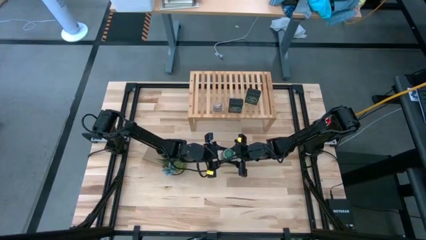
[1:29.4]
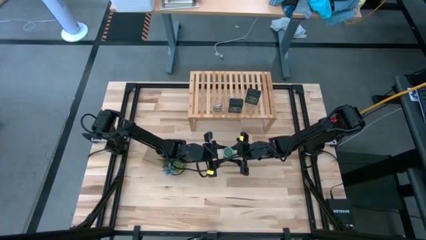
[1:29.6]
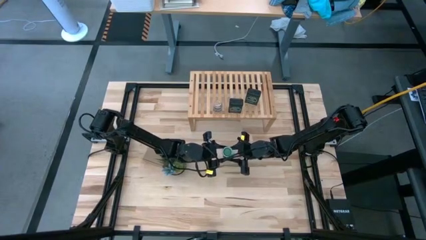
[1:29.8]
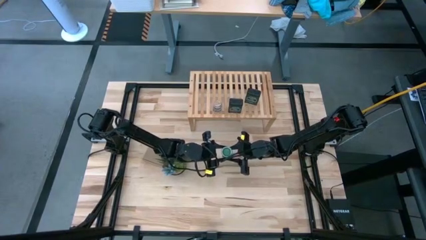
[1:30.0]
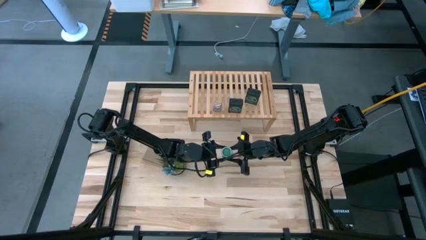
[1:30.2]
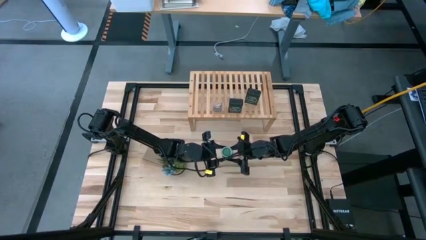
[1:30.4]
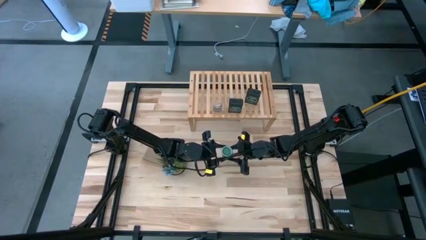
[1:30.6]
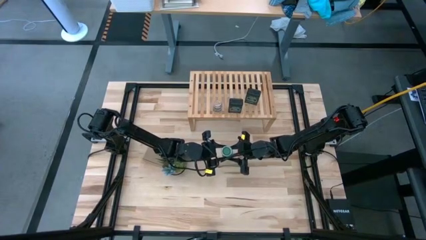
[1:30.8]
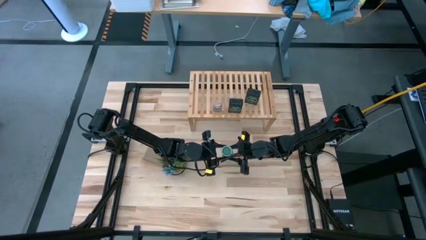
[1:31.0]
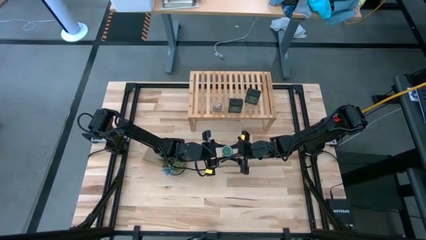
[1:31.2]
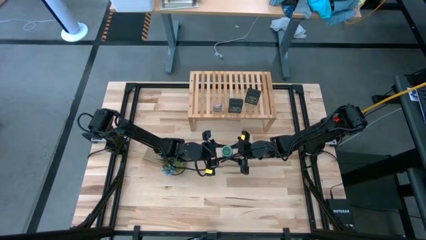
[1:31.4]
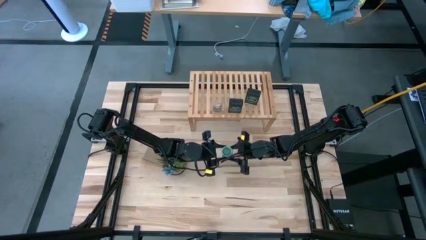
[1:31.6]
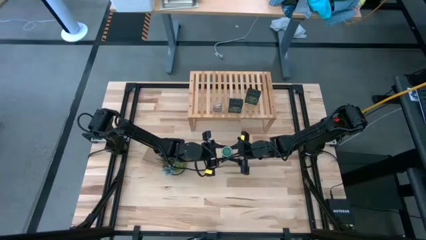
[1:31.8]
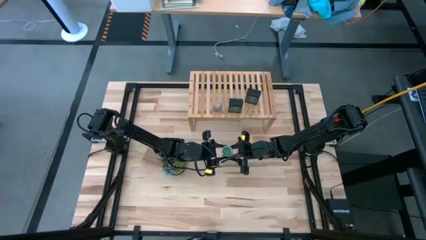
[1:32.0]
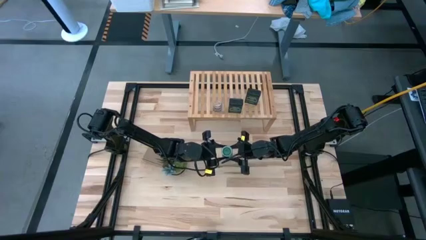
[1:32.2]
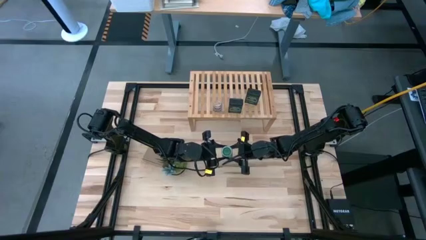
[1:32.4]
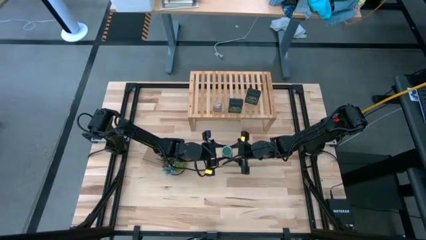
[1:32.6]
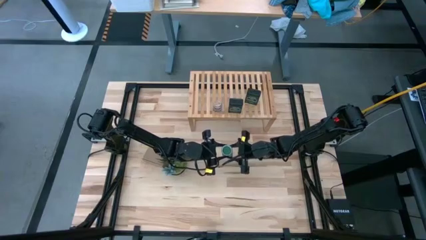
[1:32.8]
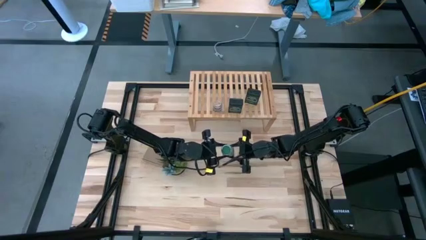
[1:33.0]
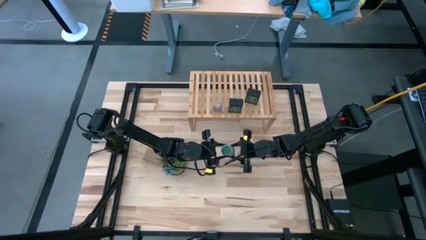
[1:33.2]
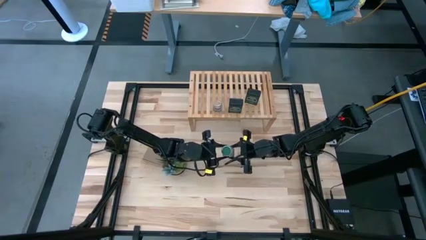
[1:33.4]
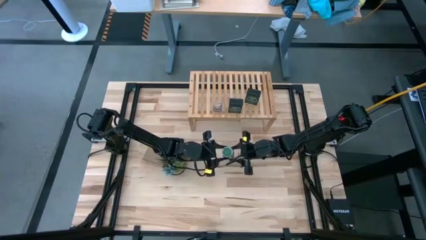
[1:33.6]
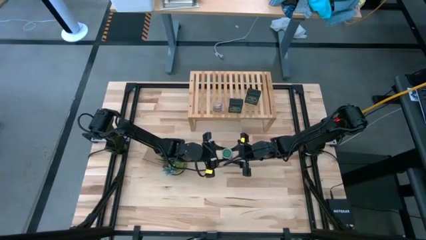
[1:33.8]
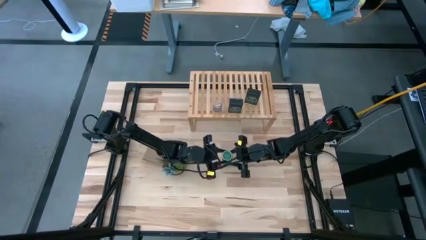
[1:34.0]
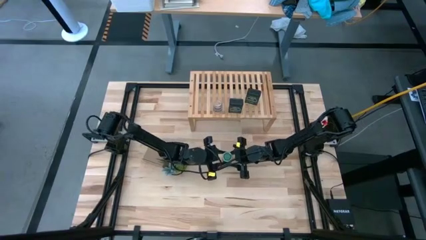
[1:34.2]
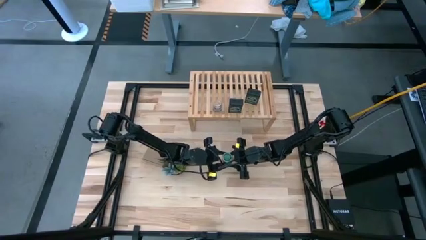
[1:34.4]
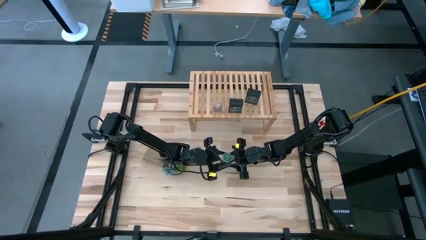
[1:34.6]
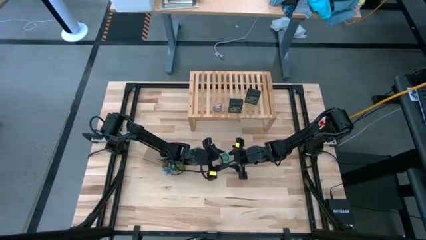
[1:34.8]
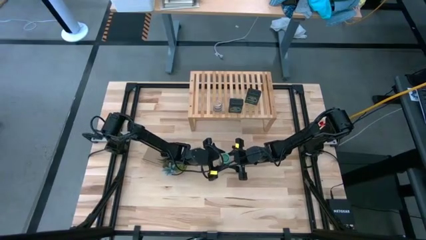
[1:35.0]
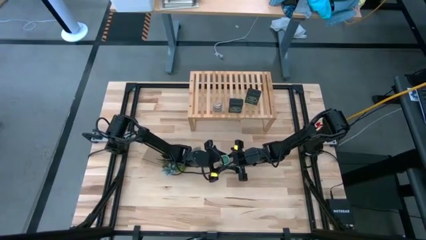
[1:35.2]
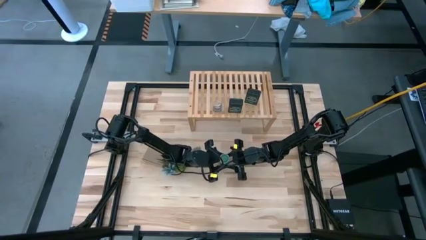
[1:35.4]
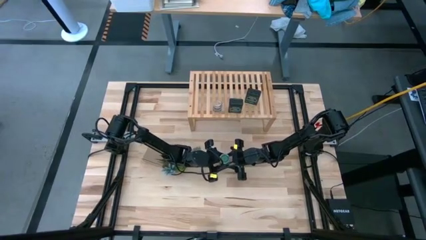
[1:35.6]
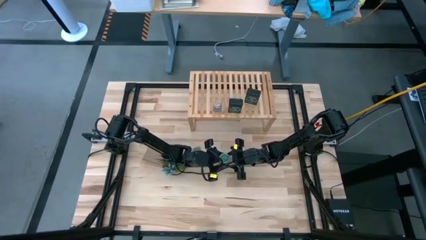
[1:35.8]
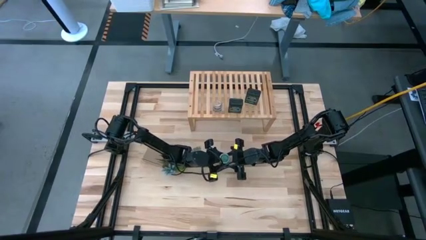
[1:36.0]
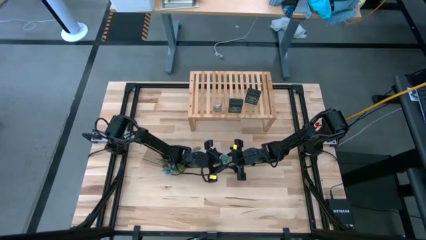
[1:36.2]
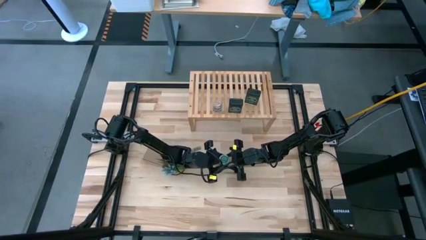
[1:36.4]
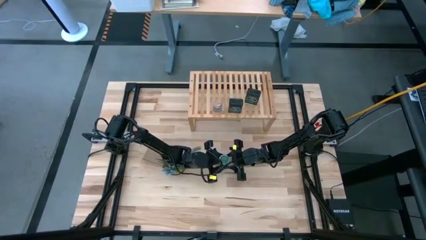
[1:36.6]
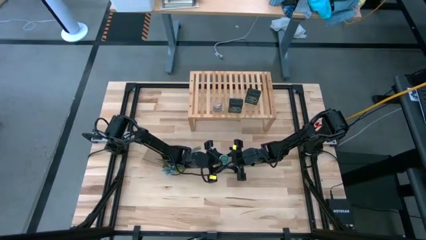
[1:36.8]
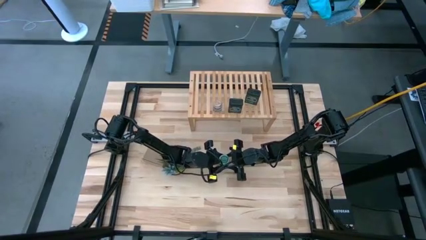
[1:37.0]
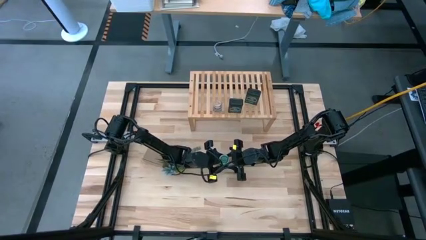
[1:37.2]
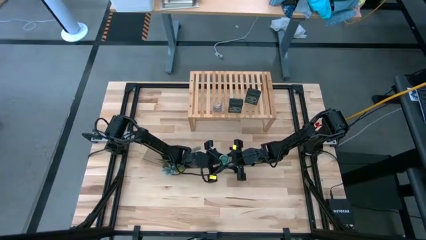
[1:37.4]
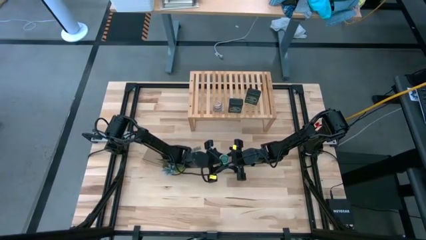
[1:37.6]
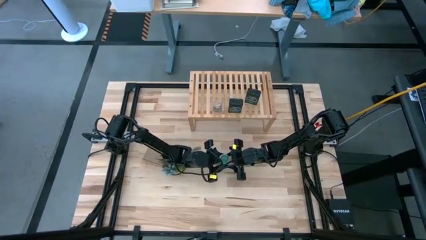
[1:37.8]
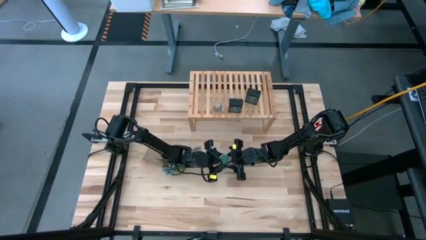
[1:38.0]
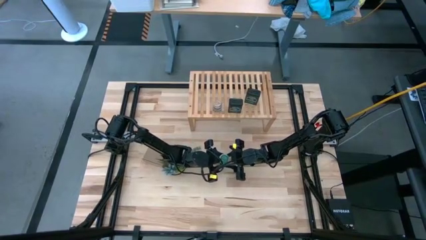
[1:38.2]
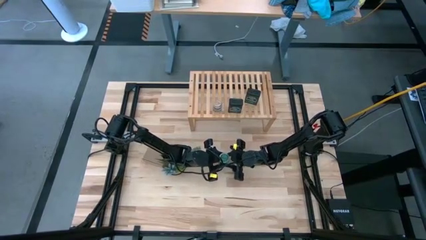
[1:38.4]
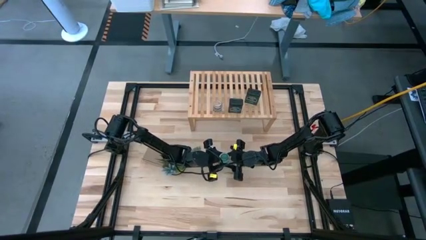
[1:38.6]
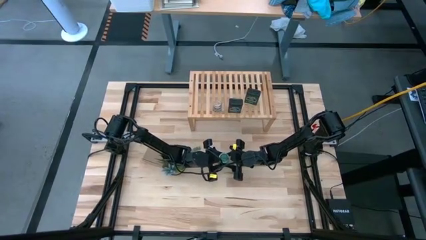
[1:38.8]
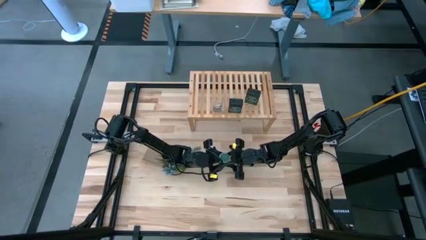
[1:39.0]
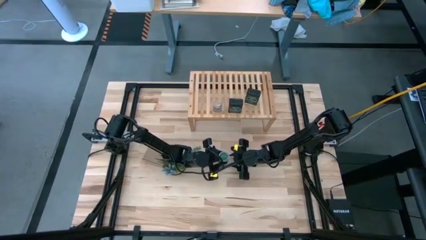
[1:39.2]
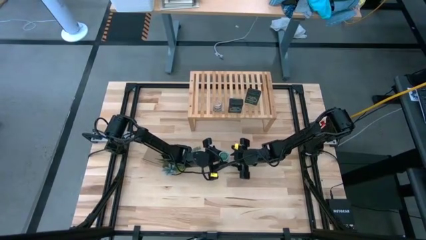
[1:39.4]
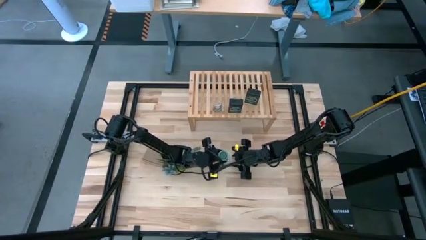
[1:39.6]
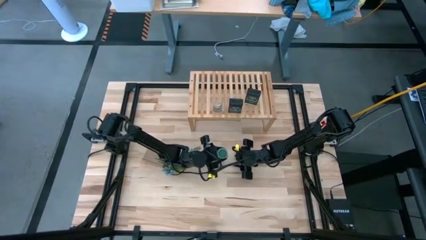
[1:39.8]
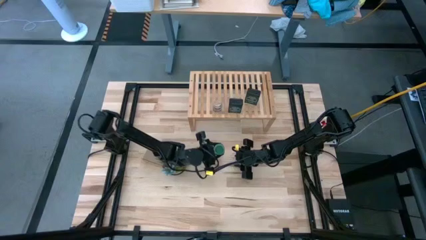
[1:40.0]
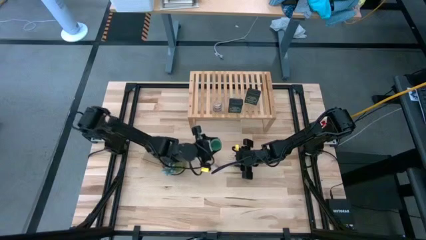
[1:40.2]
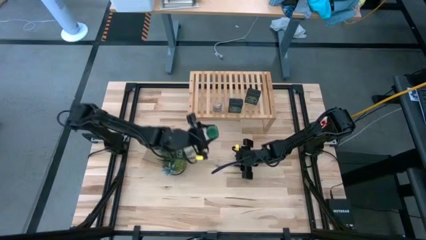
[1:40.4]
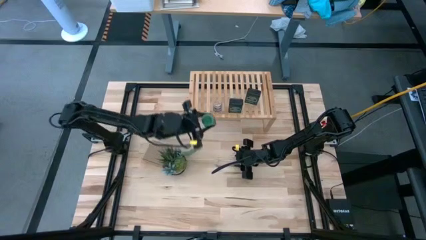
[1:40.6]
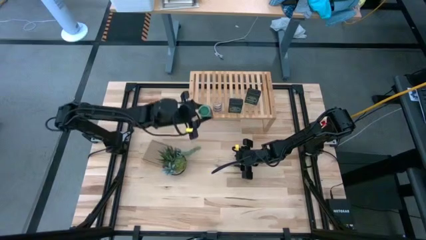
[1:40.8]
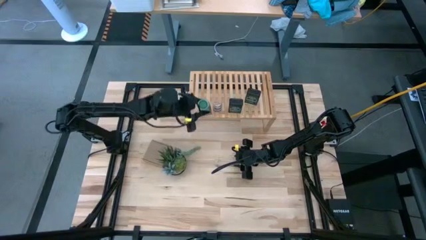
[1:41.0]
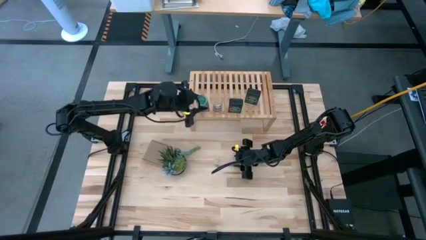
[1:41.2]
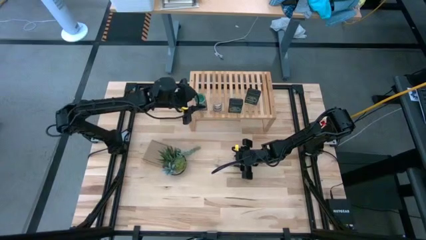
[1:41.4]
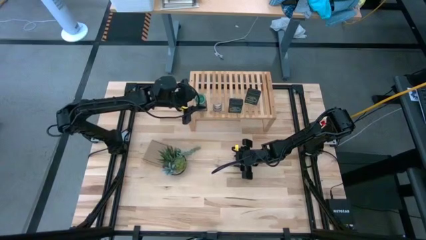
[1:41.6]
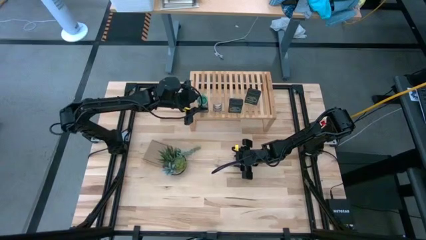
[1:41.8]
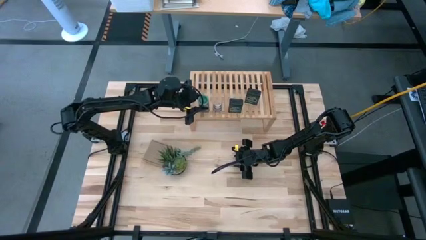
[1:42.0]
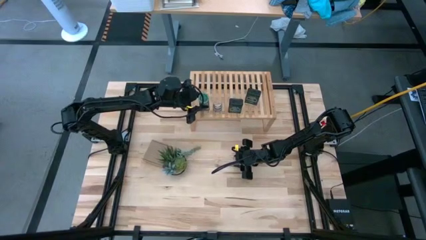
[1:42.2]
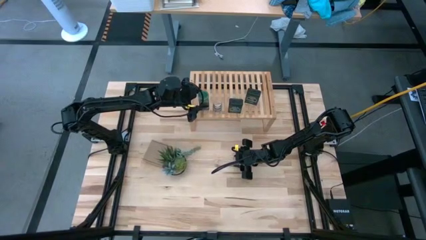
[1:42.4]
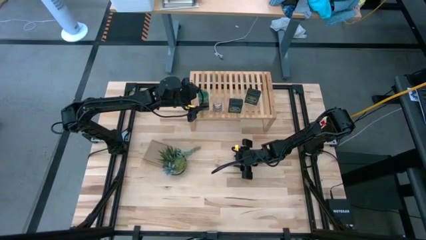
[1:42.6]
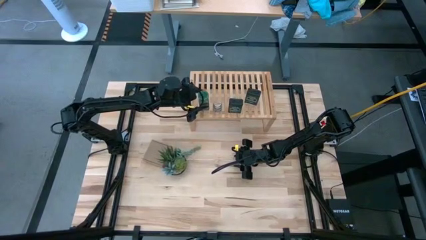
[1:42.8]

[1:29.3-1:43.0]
Task: Shelf spices
Put the green seasoning bottle on the shelf

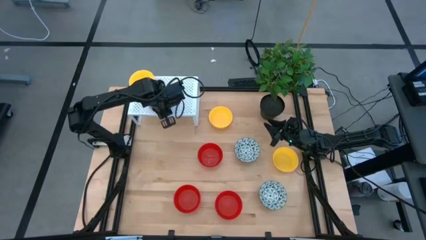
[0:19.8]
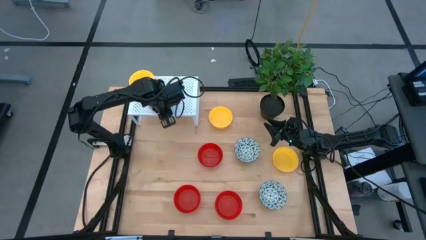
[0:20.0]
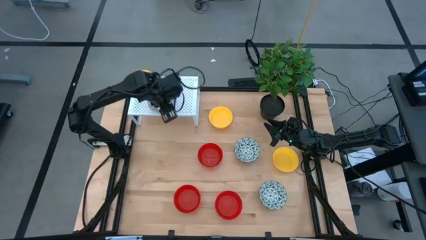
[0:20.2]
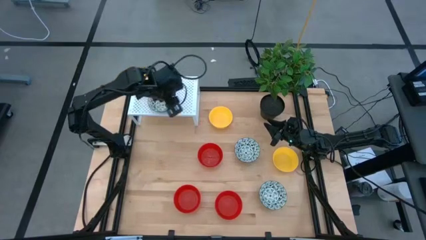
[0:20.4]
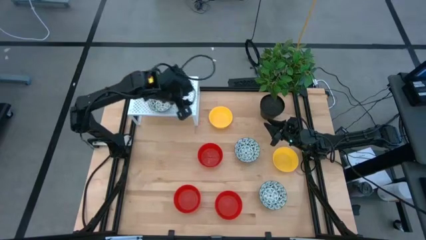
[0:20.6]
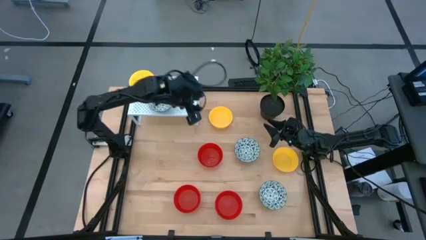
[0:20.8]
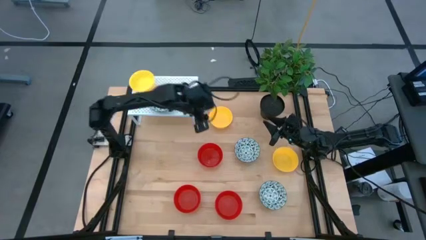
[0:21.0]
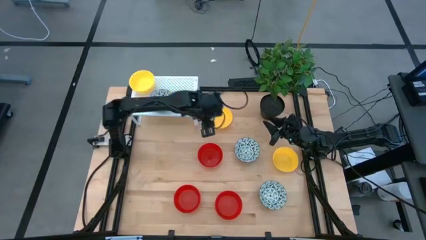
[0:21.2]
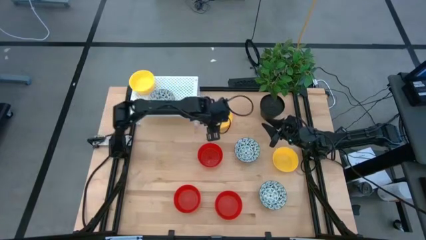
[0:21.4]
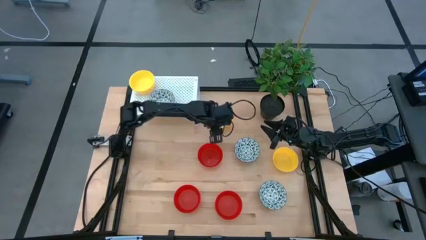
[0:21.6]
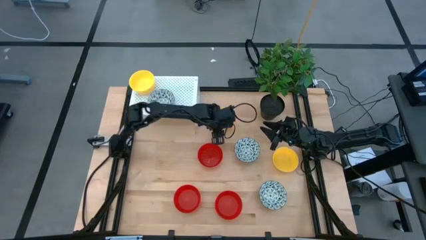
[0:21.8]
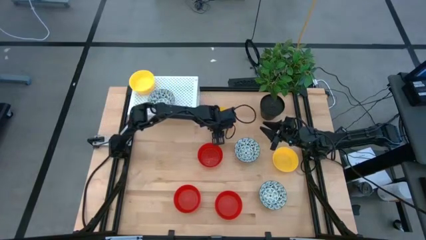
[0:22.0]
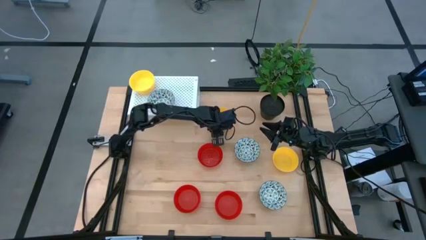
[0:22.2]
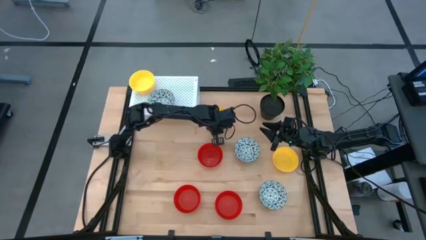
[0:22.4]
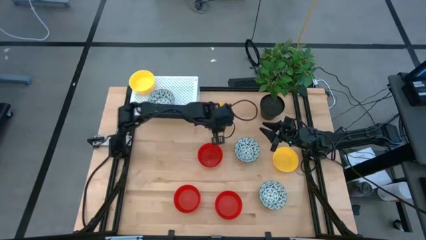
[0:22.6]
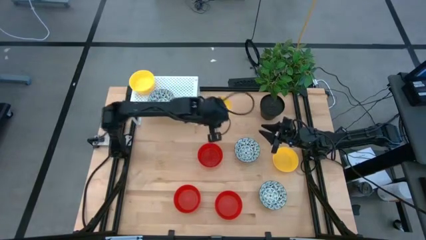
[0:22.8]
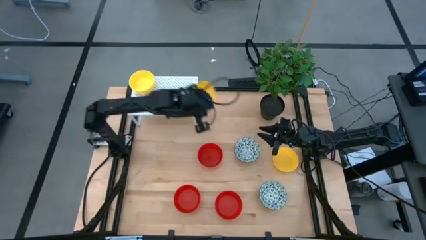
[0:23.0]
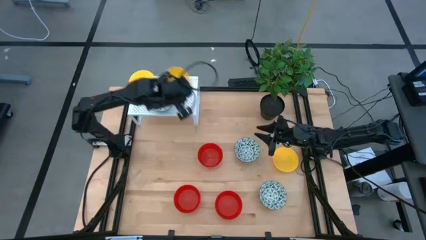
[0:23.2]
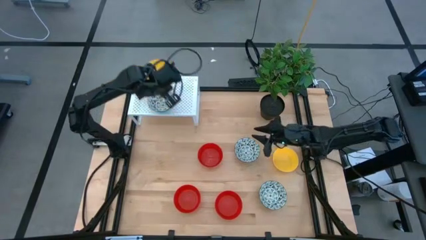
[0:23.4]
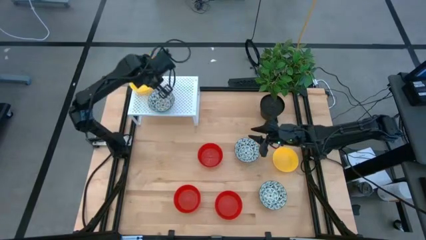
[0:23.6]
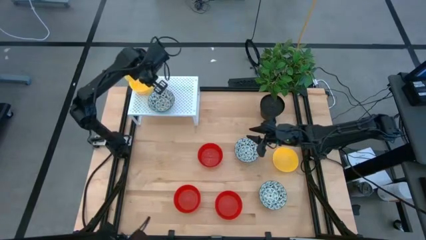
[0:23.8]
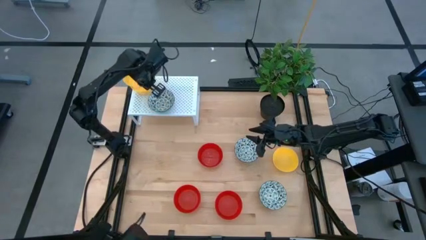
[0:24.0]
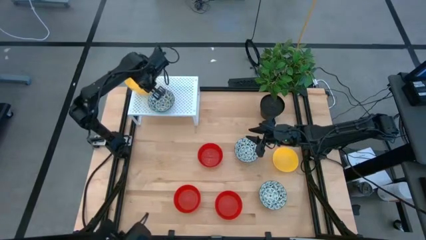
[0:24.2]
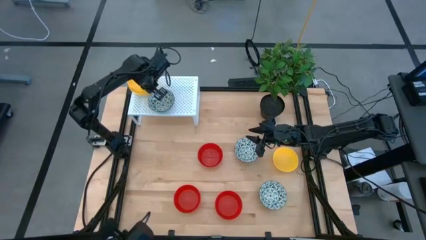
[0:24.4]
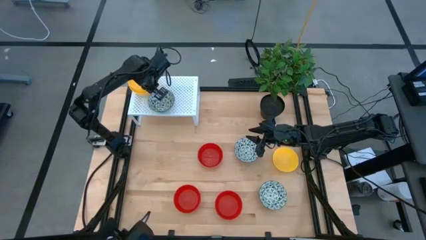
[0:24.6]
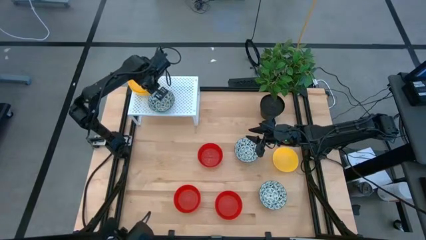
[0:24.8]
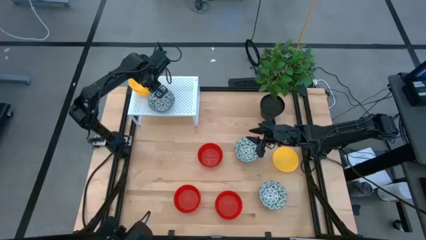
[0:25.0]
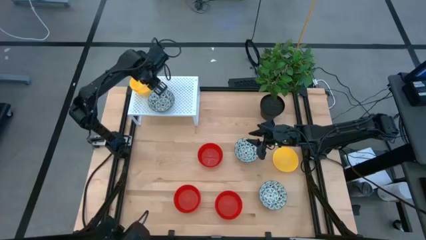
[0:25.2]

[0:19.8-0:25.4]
Task: Pick & Place Mini bowls
Stack the yellow bowl on top of the yellow bowls on the shelf
